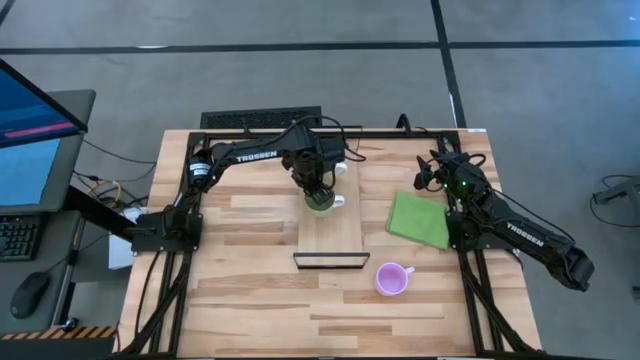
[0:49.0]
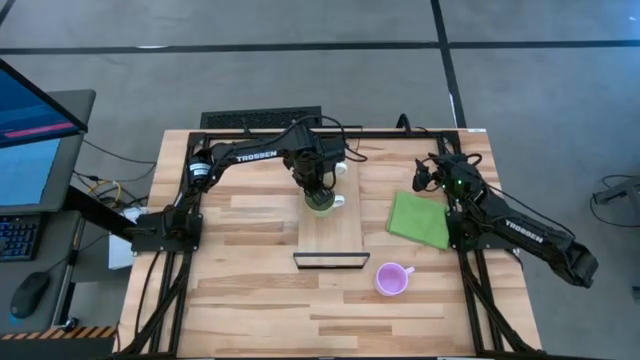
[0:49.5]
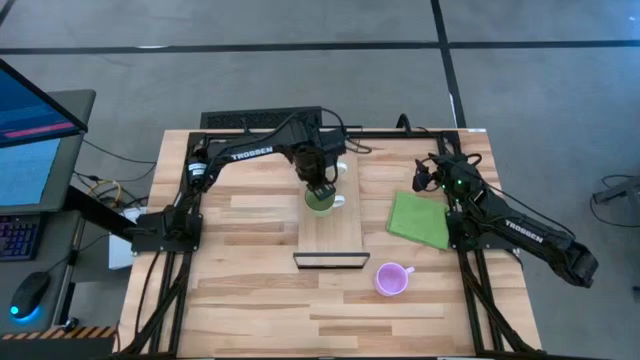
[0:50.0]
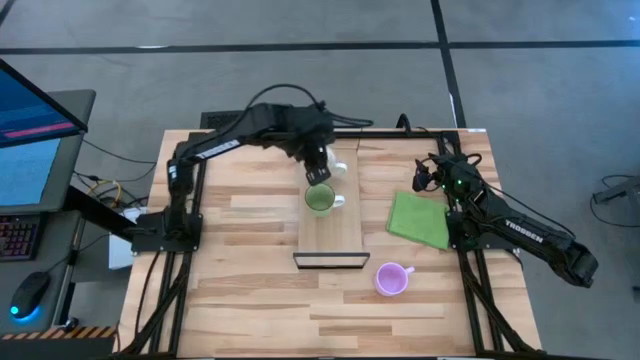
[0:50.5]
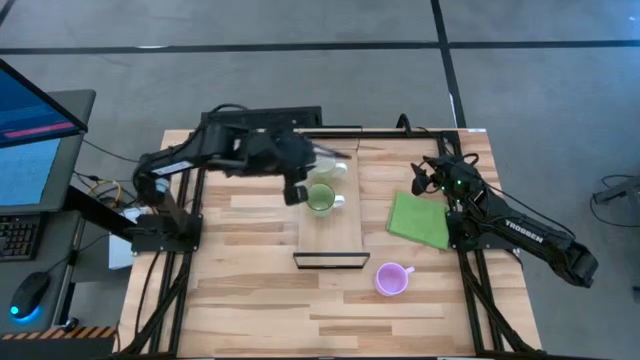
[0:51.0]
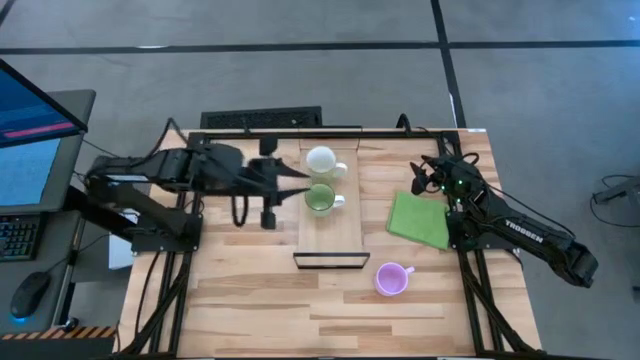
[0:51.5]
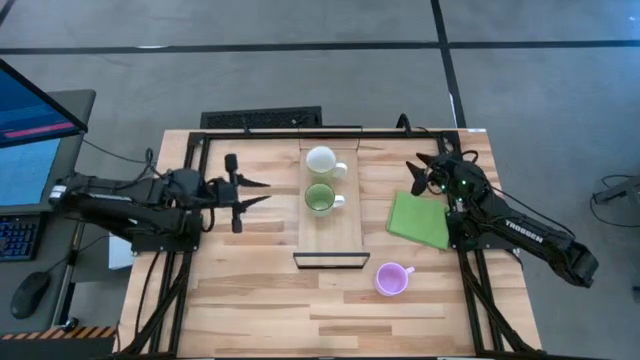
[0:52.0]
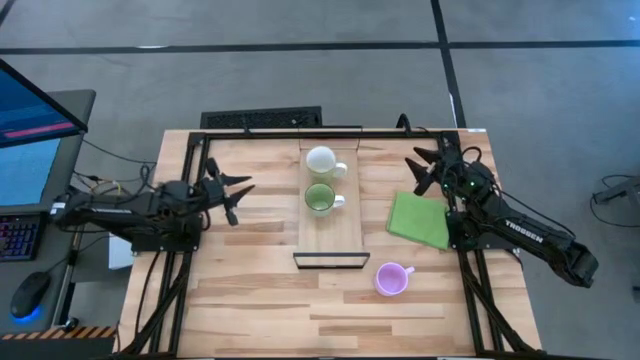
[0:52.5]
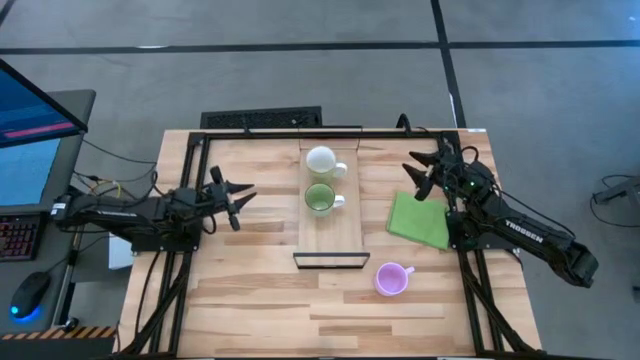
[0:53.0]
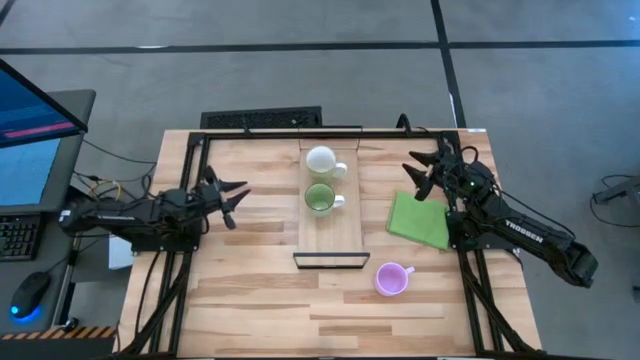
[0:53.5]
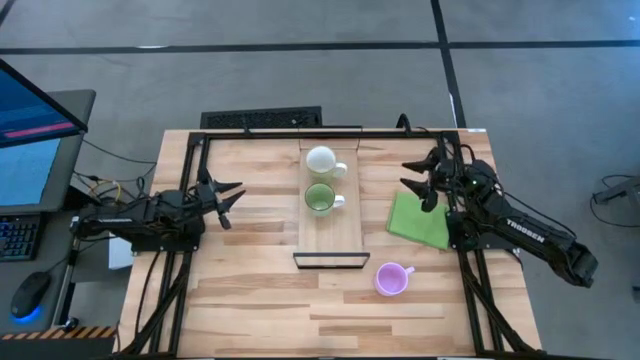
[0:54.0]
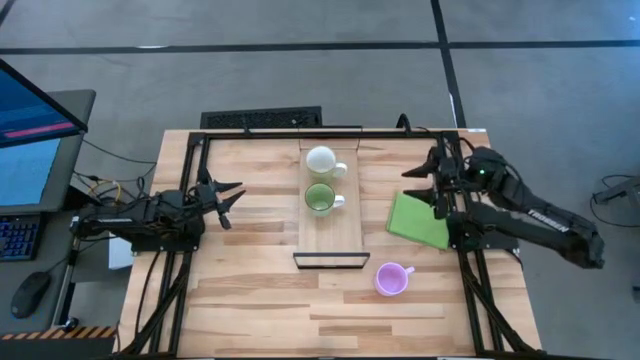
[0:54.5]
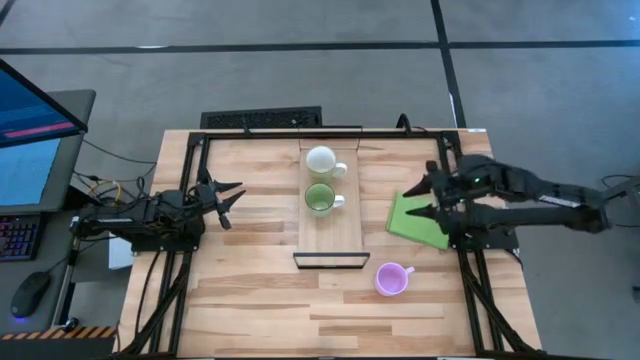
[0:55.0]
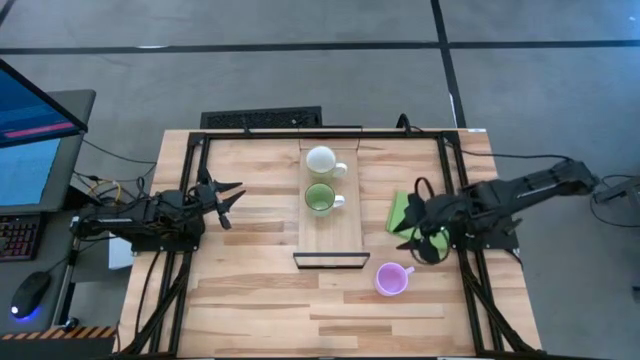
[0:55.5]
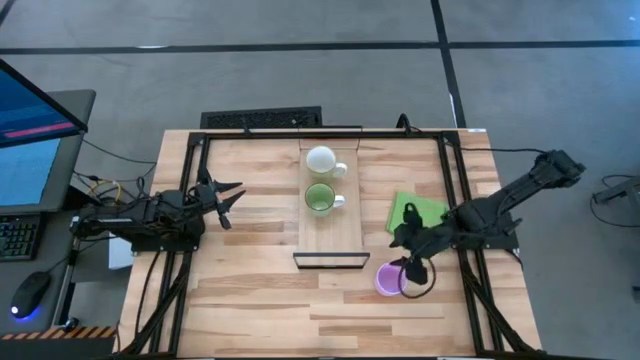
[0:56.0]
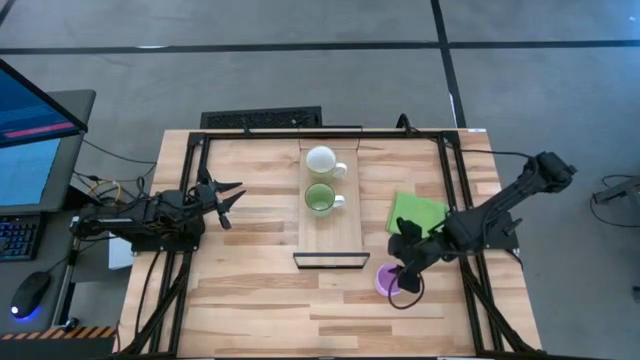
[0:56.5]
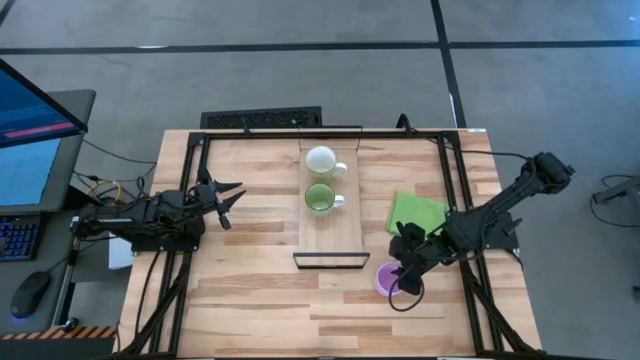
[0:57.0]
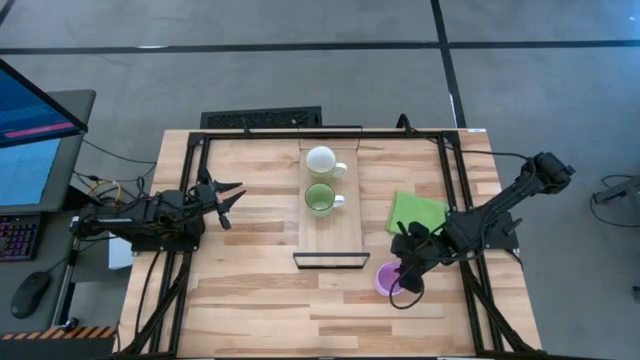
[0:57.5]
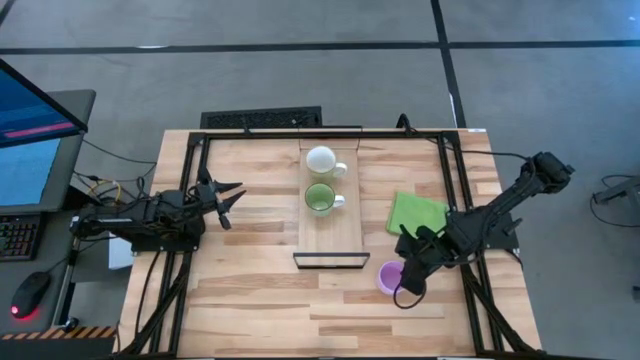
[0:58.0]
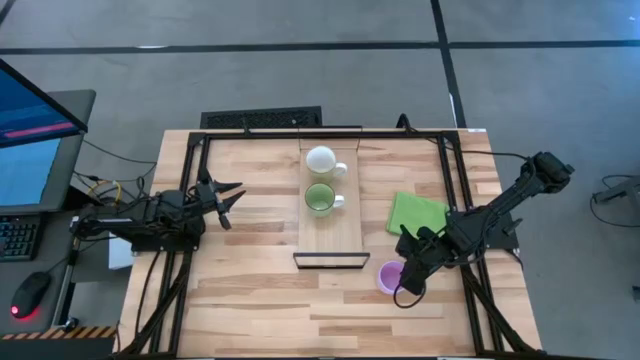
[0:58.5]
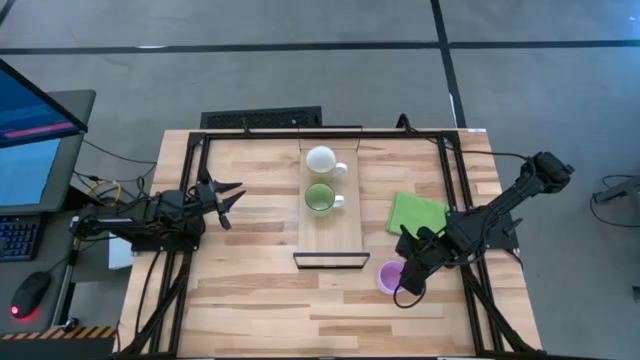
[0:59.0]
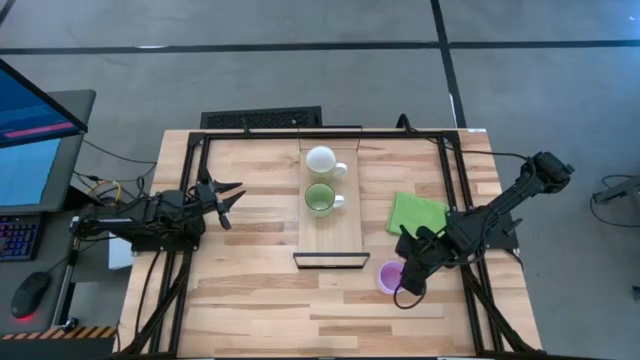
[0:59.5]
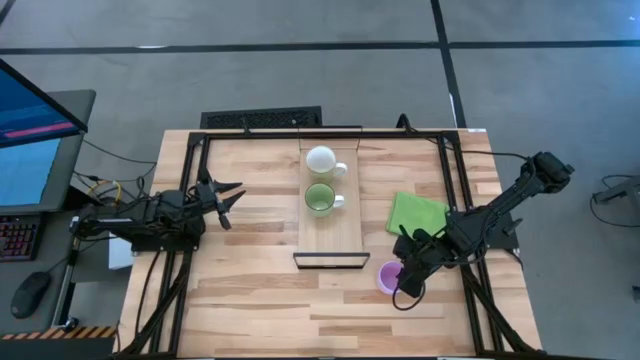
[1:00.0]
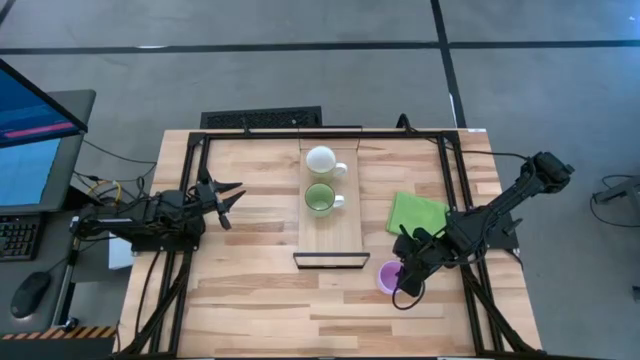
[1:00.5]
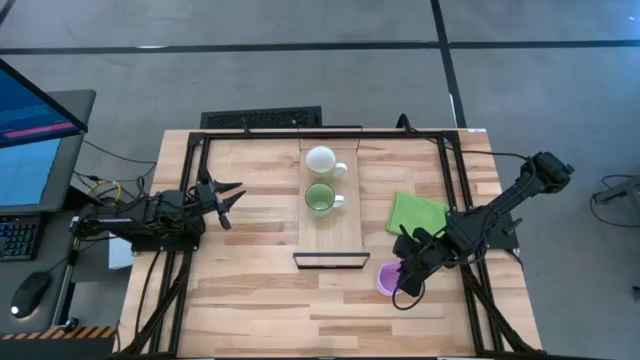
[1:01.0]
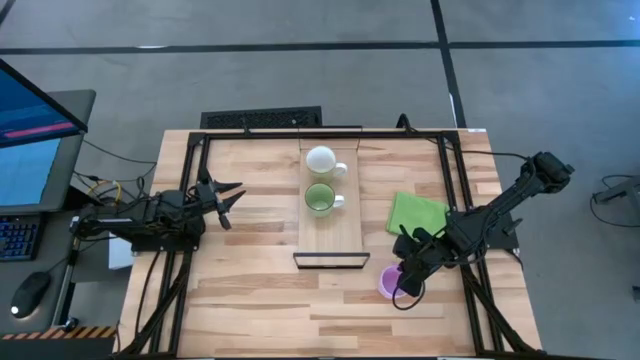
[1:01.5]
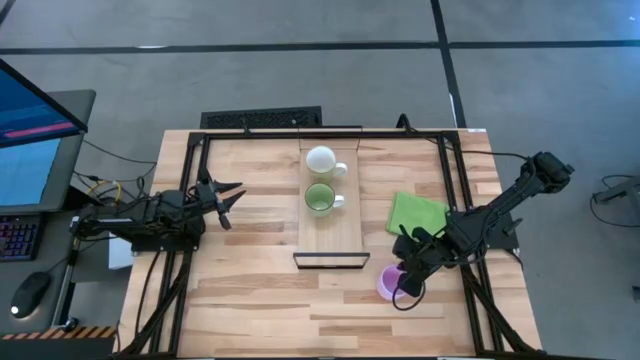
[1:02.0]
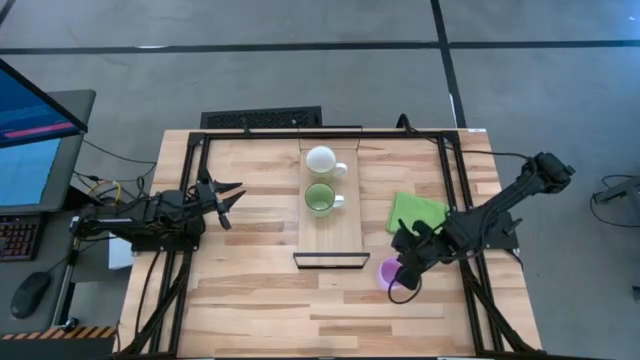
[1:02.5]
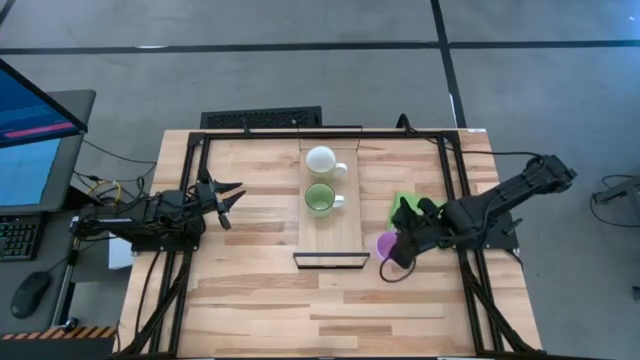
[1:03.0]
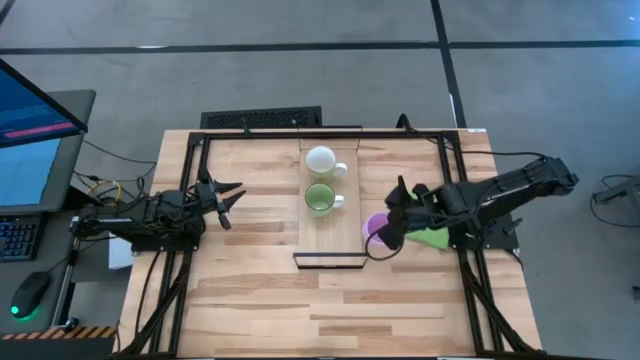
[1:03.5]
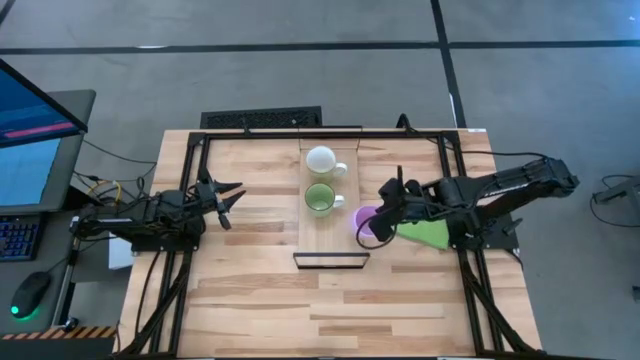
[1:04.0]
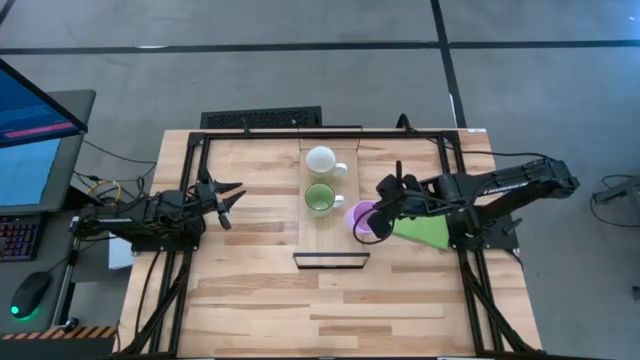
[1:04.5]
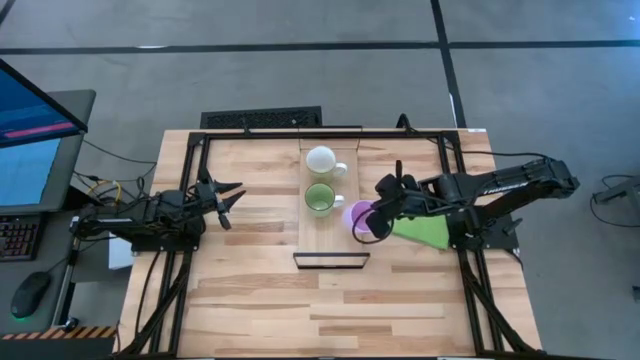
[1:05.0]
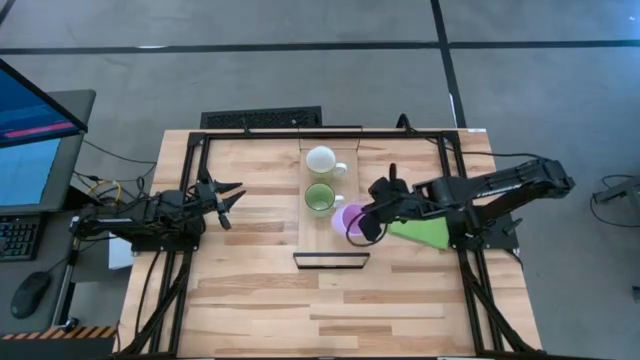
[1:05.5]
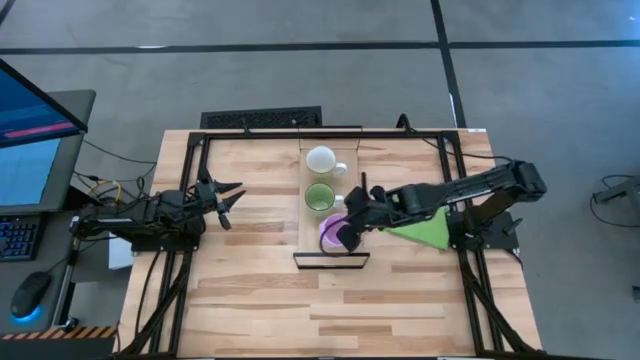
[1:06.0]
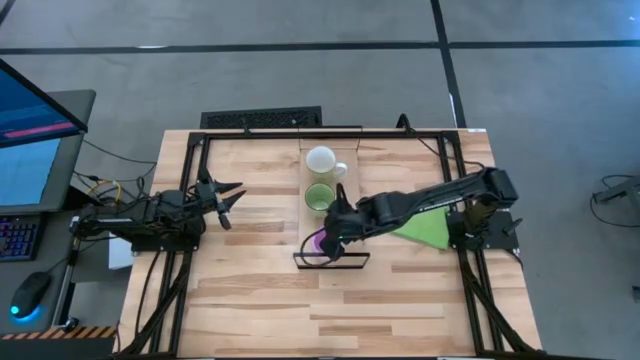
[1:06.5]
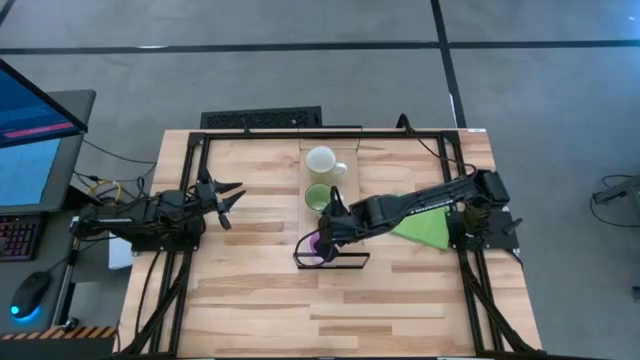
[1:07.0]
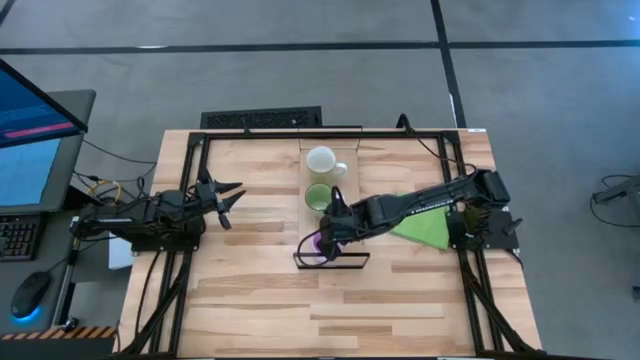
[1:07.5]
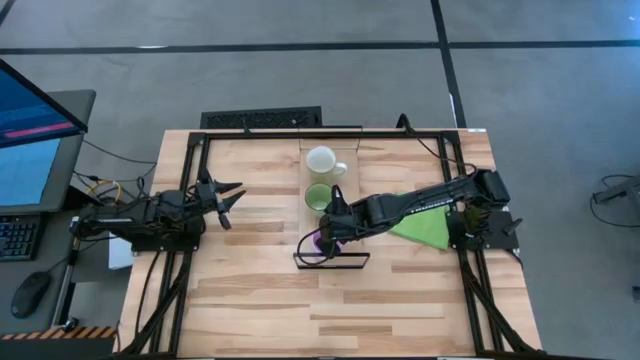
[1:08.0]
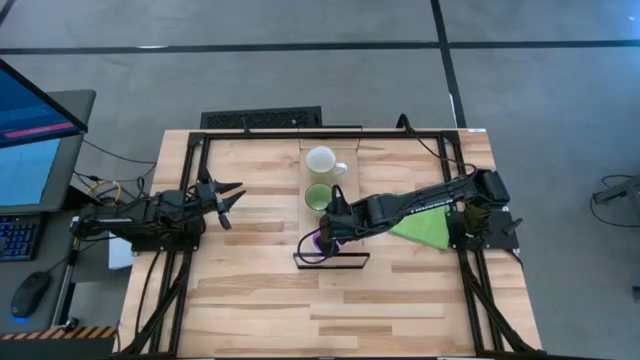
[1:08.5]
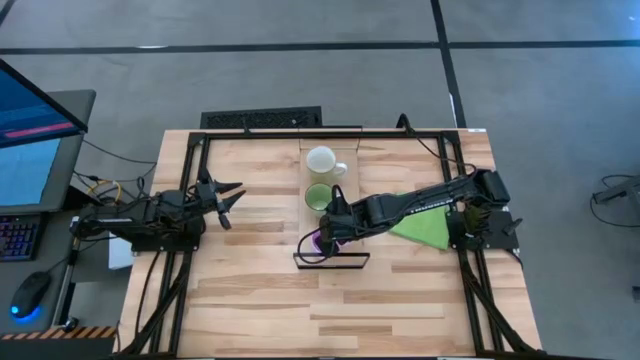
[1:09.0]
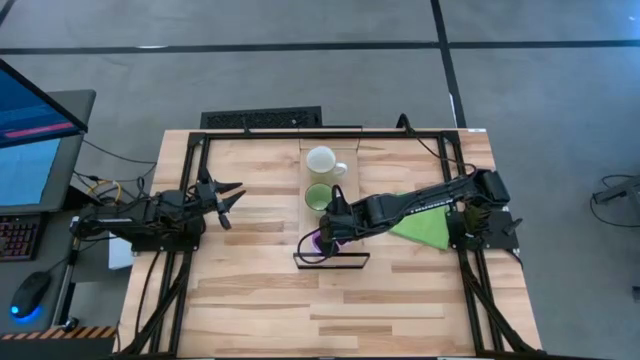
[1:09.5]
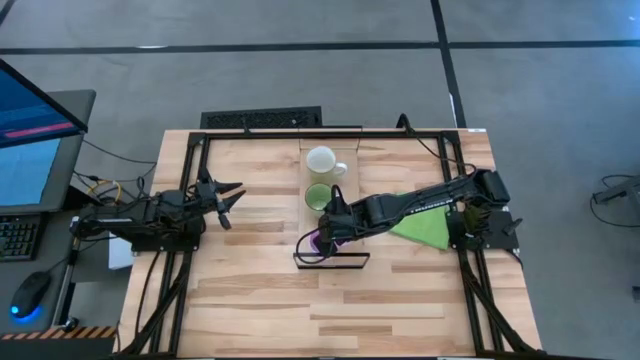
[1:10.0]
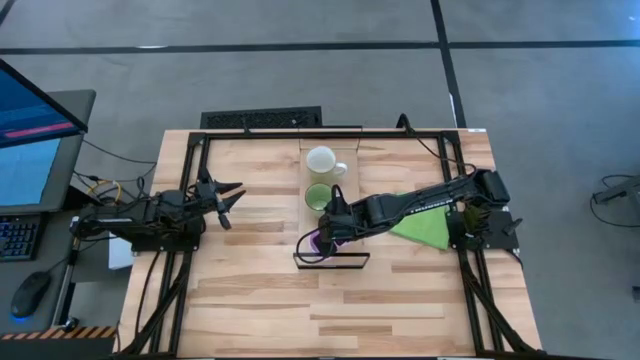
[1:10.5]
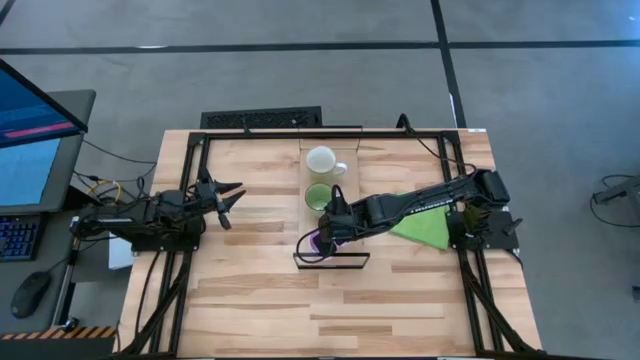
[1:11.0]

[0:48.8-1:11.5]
Task: Stack small to large cups/mugs on shelf
Put the purple mug on the shelf
